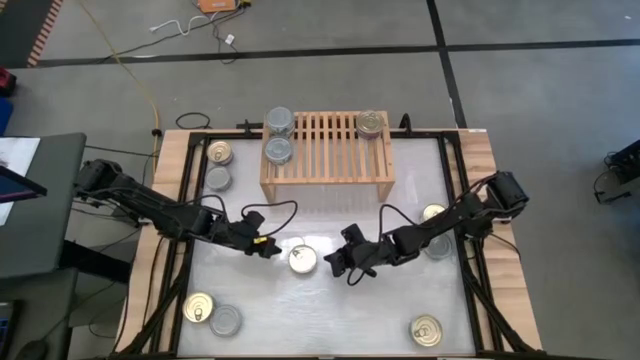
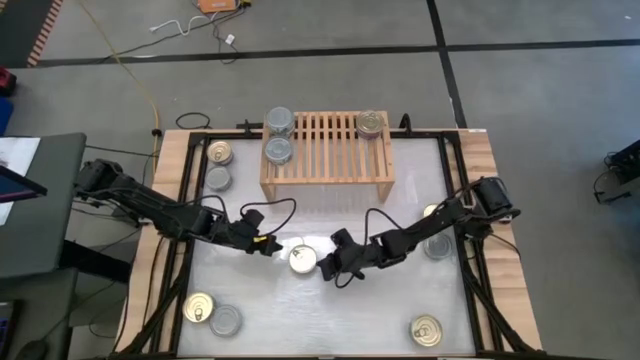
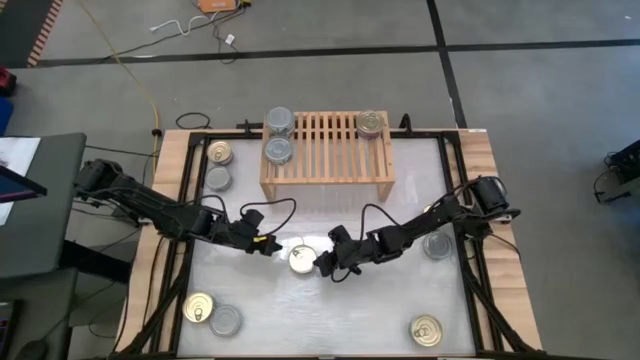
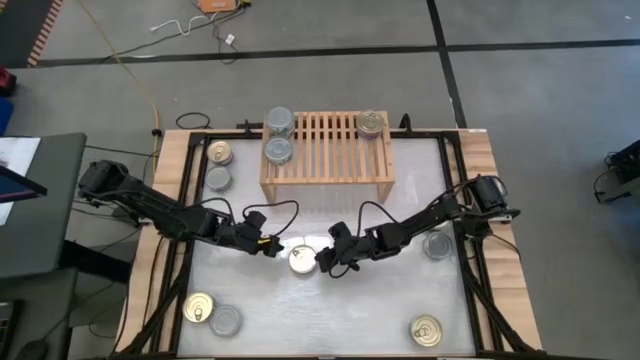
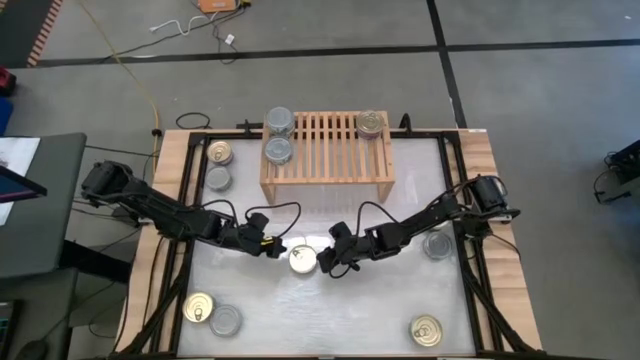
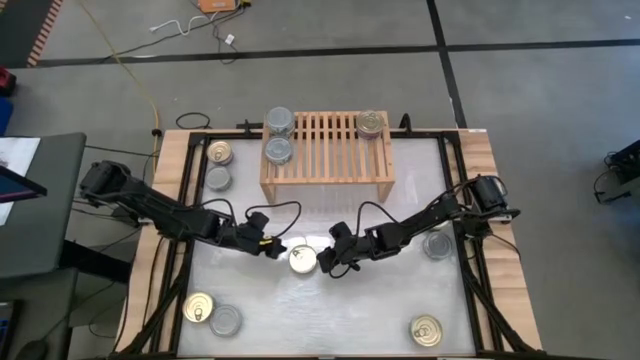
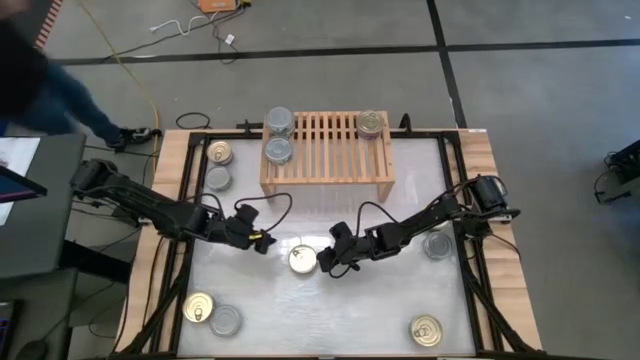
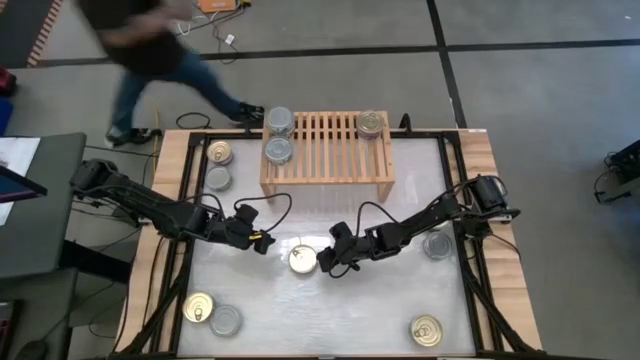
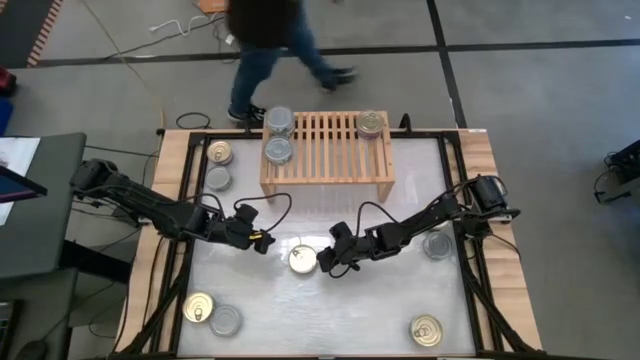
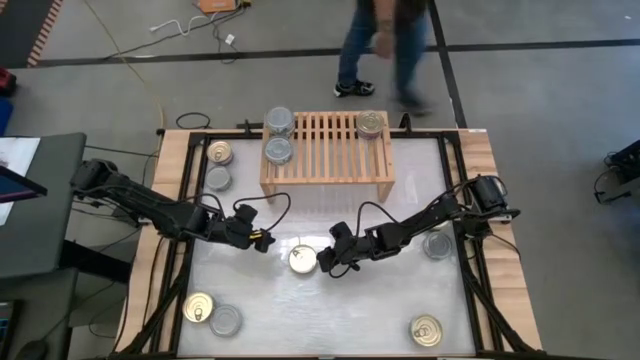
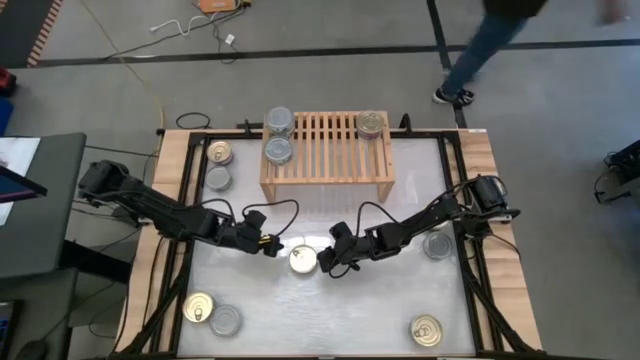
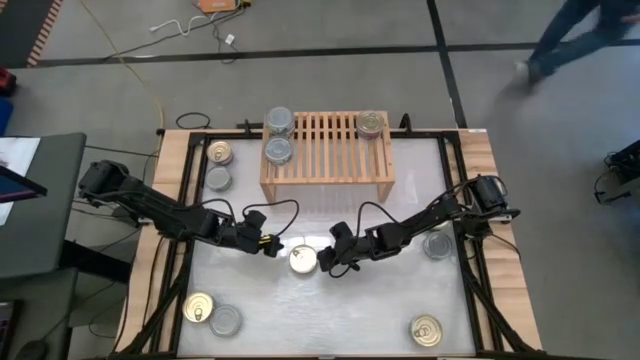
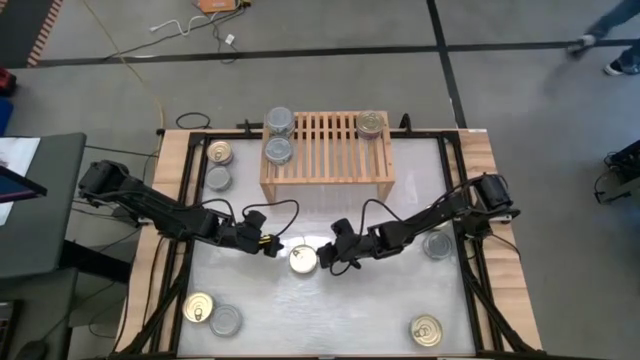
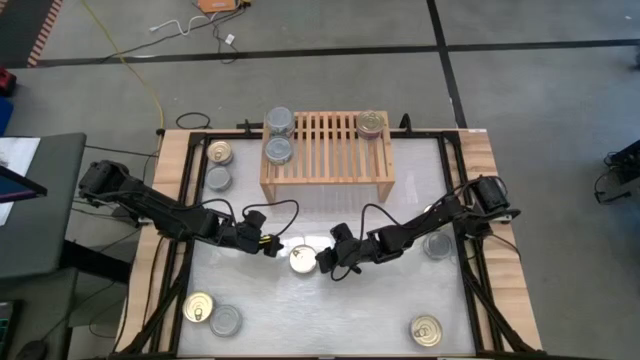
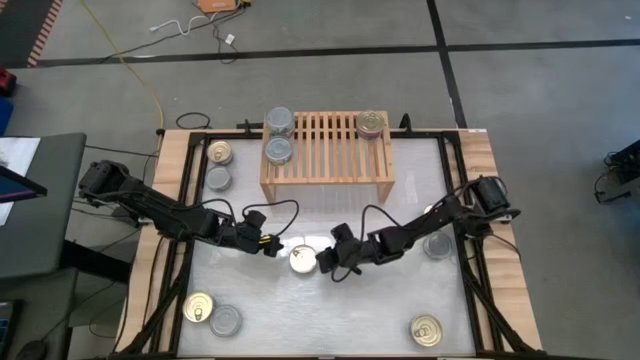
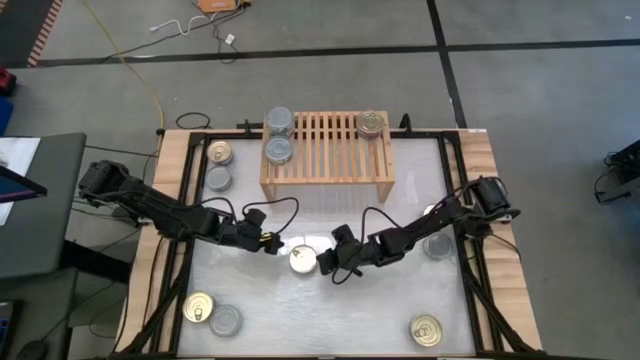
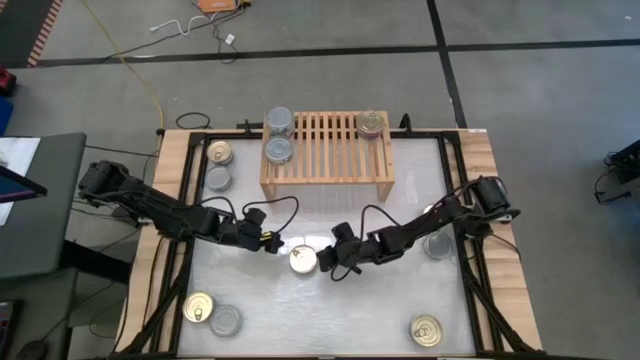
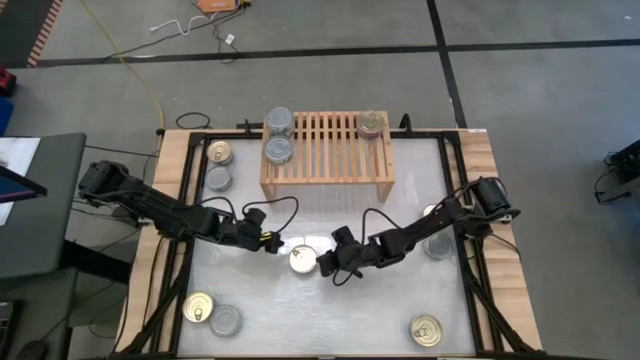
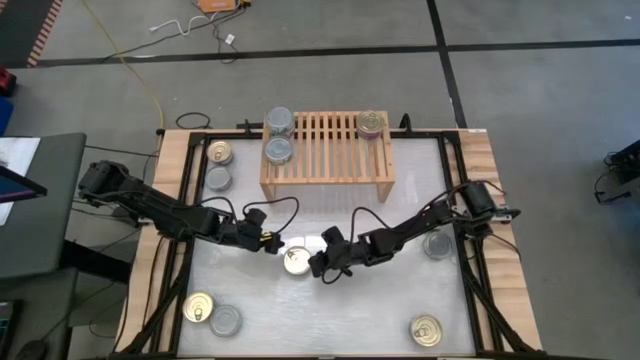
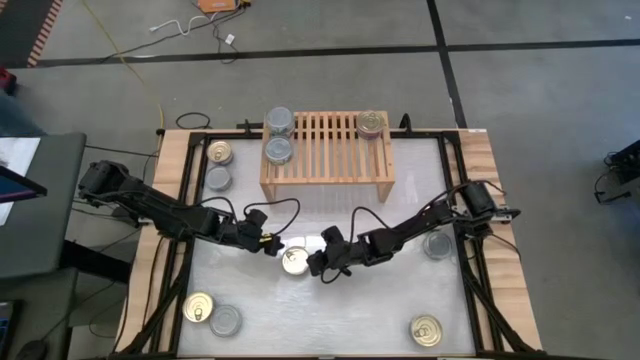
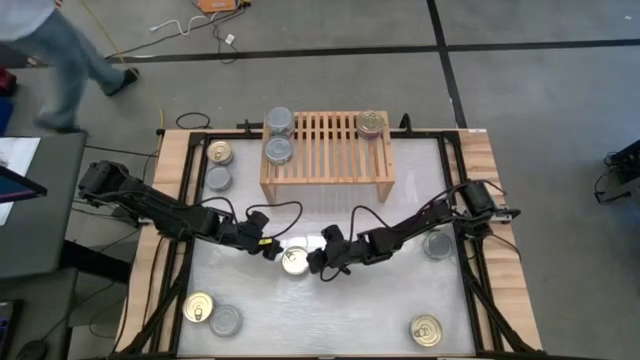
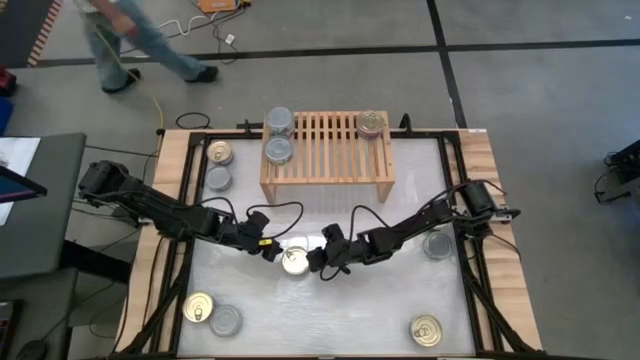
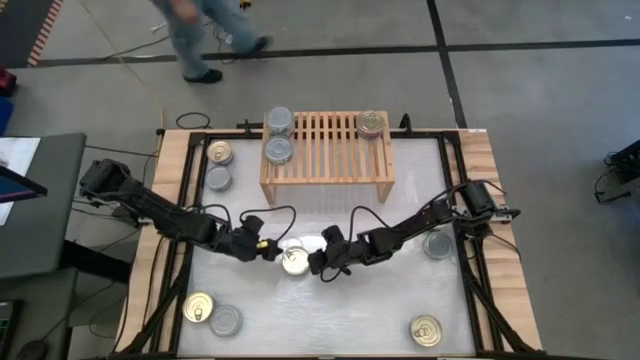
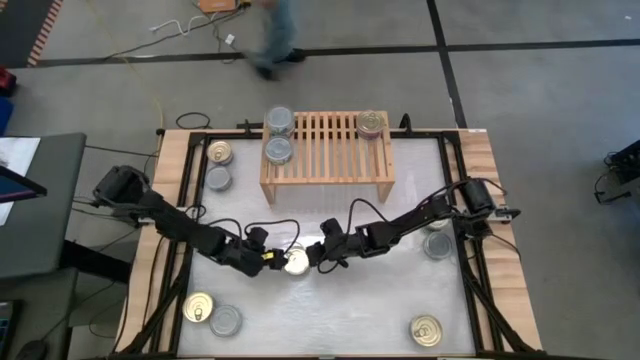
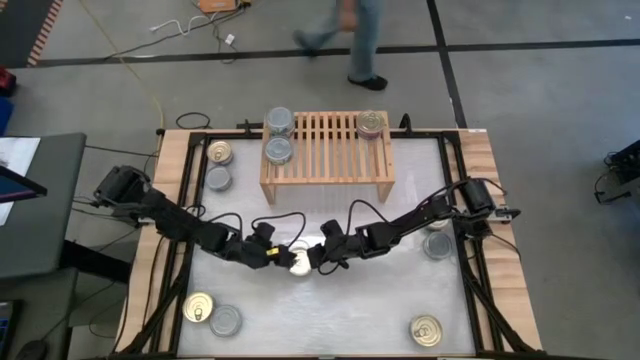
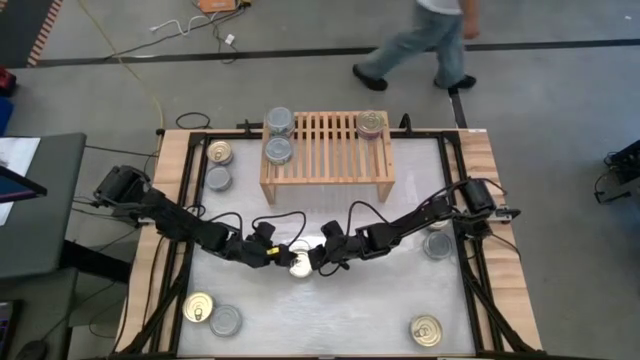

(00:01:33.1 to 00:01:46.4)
Task: Stack canned seafood by type on shelf
Stack the blue tuna can on top of the blue tuna can on the shelf

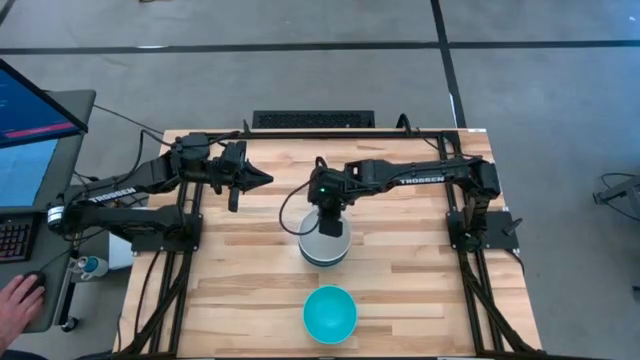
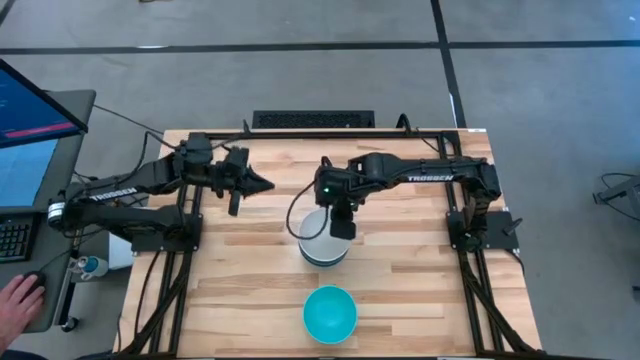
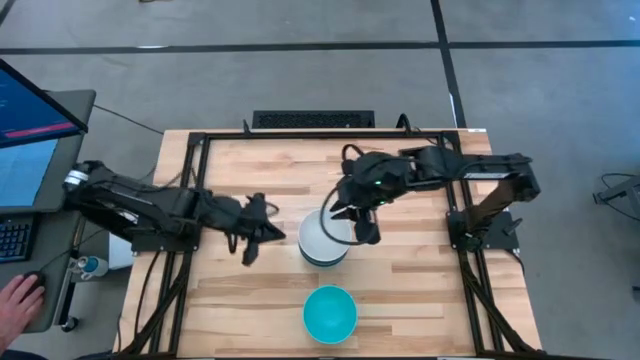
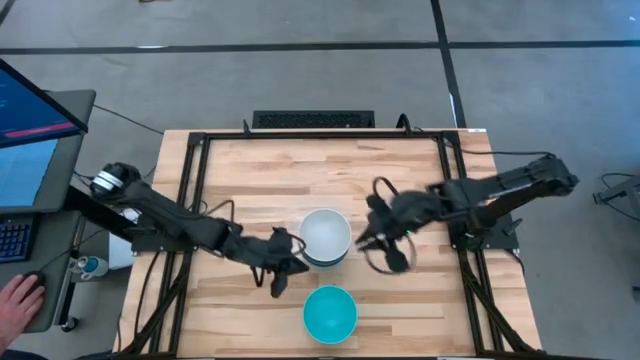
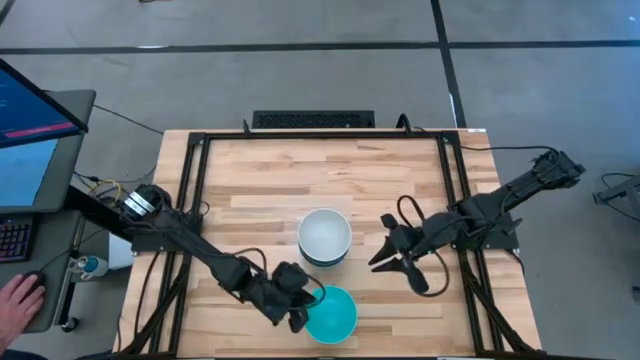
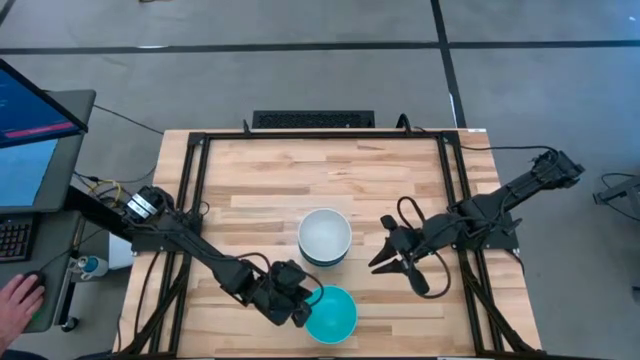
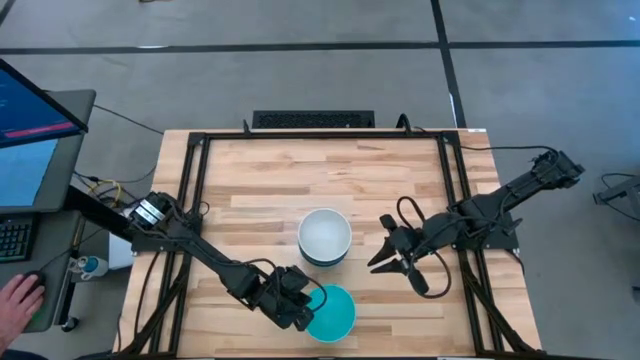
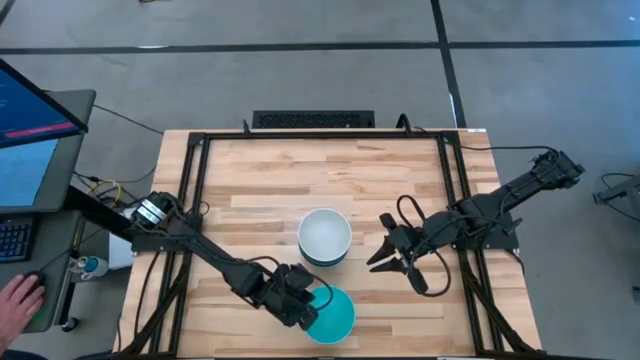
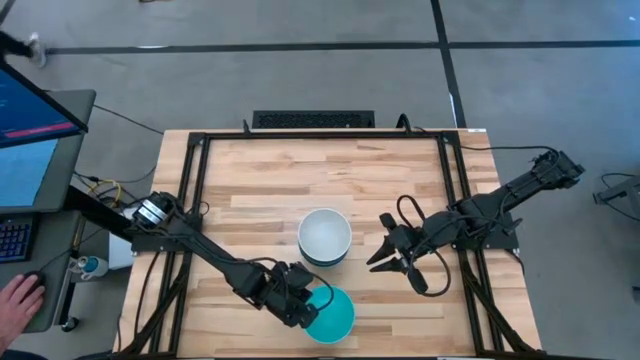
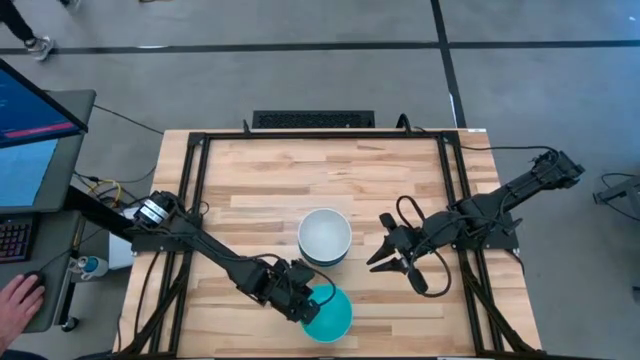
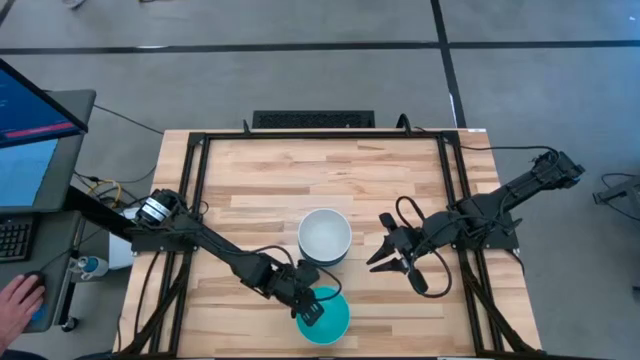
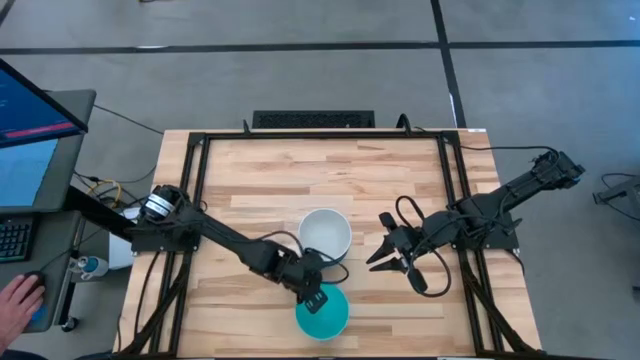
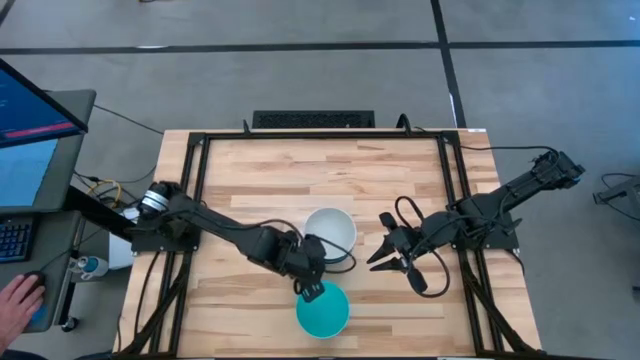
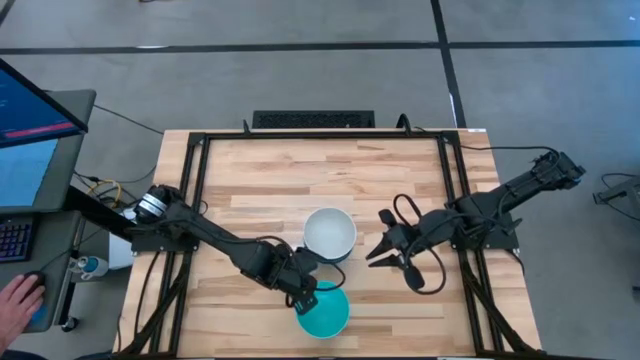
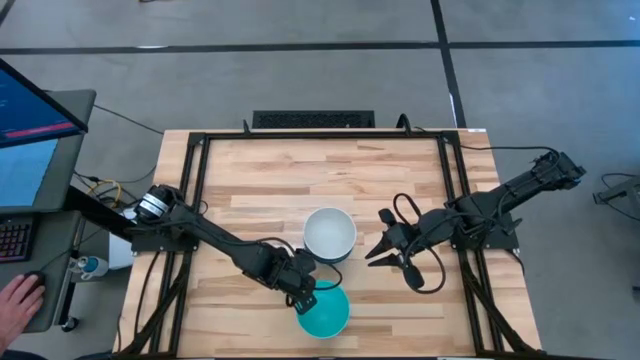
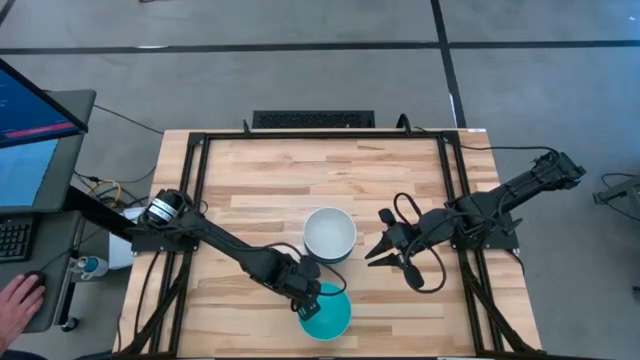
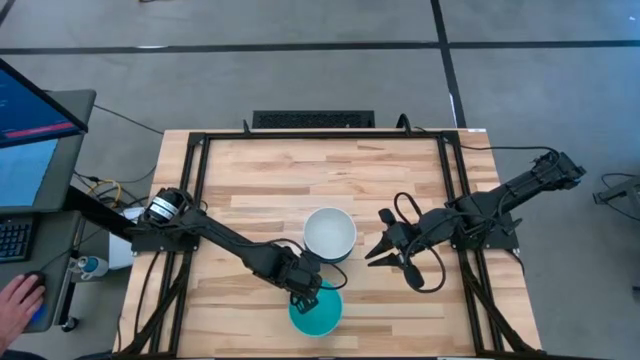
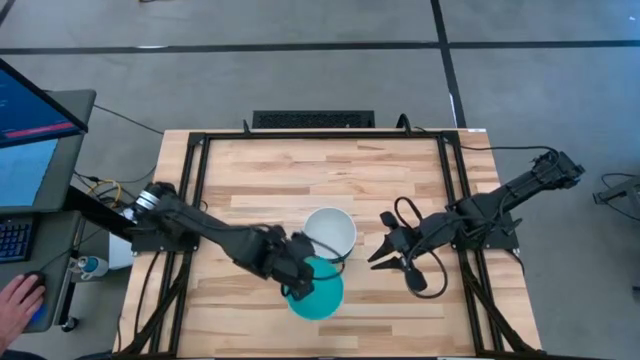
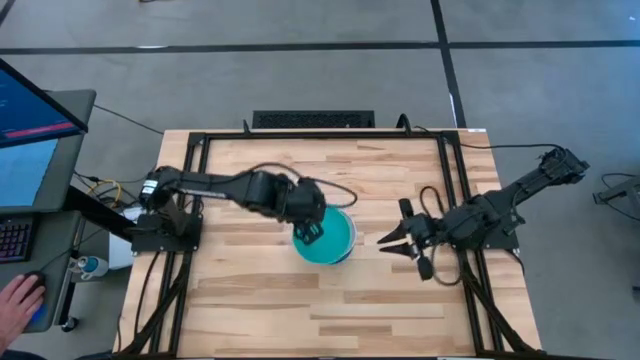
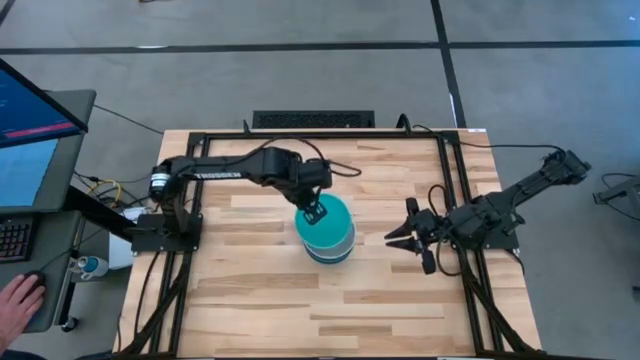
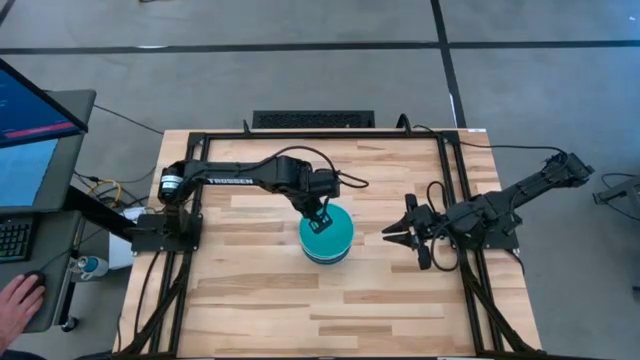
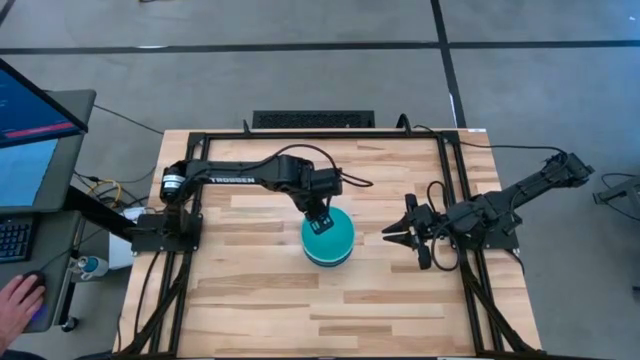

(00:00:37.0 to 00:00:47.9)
Task: Nest bowls inside each other
Stack the blue bowl on the white bowl
